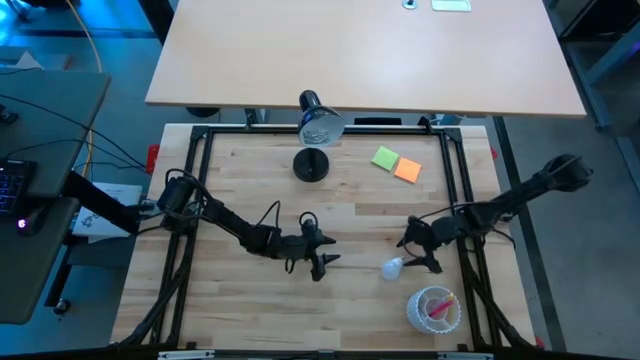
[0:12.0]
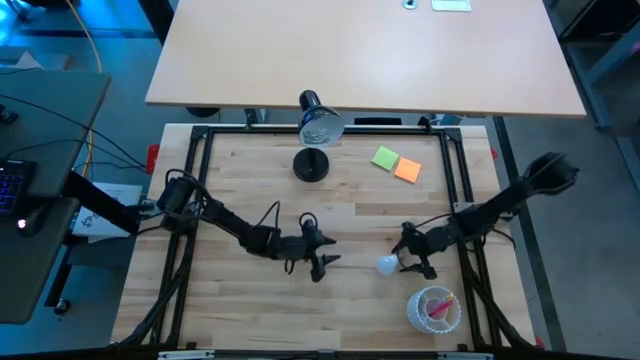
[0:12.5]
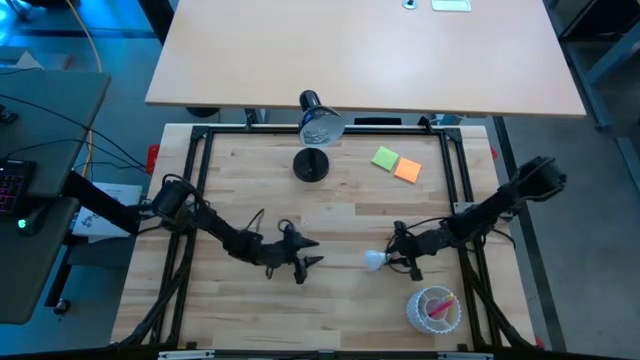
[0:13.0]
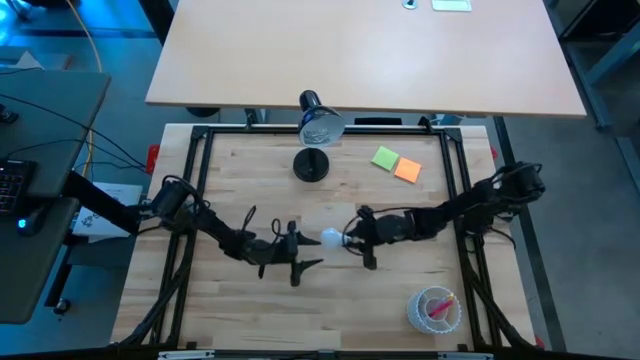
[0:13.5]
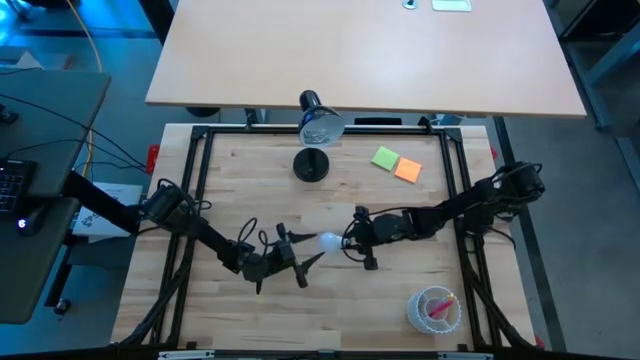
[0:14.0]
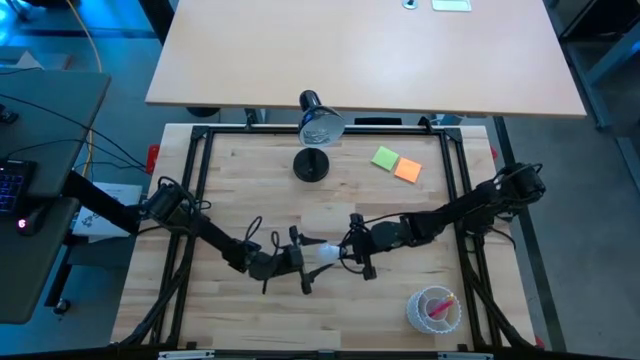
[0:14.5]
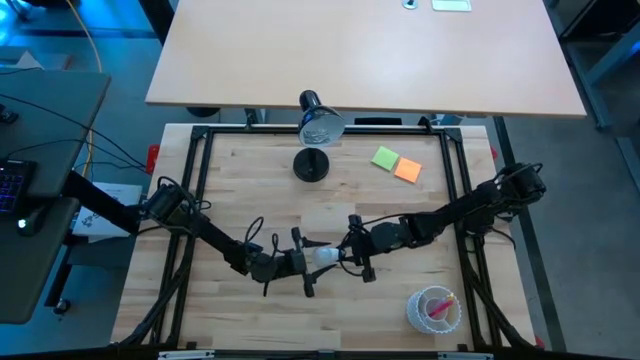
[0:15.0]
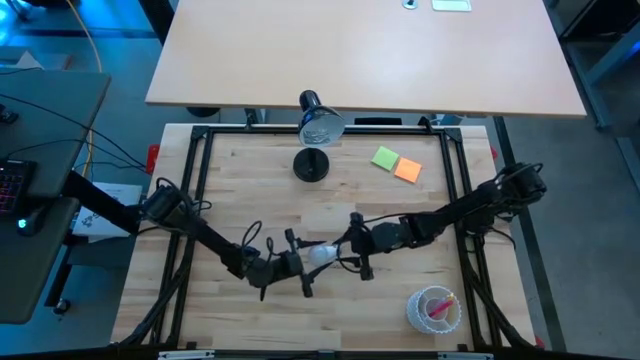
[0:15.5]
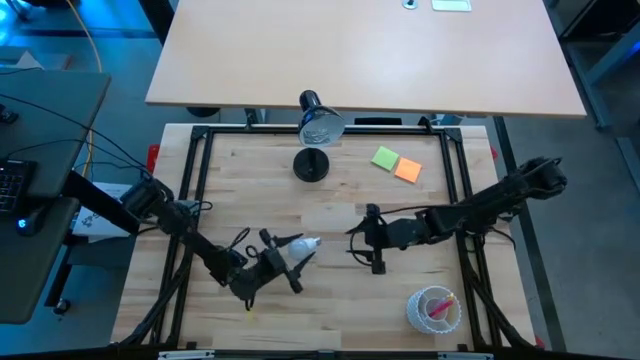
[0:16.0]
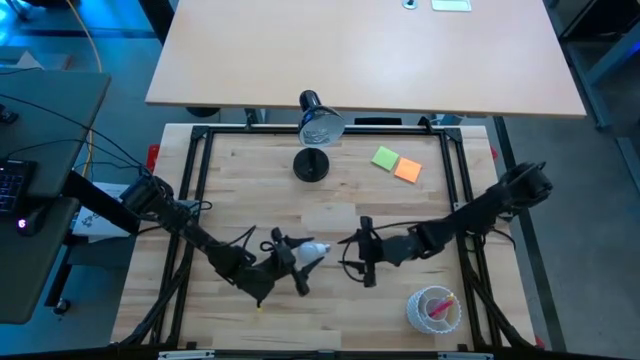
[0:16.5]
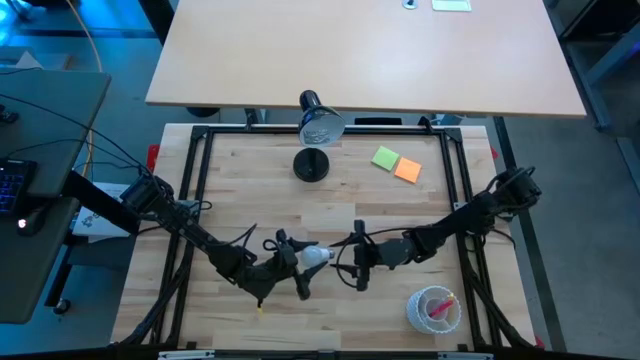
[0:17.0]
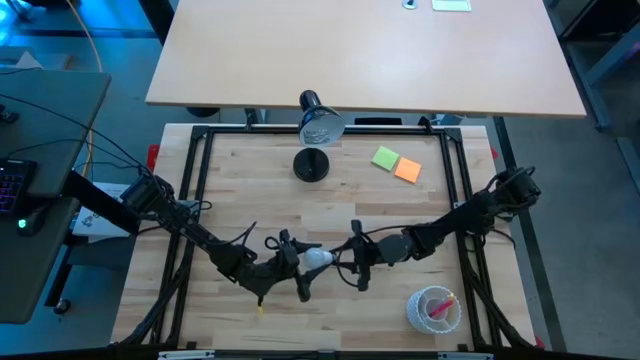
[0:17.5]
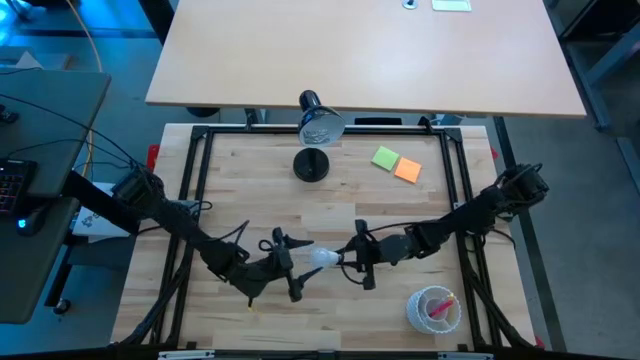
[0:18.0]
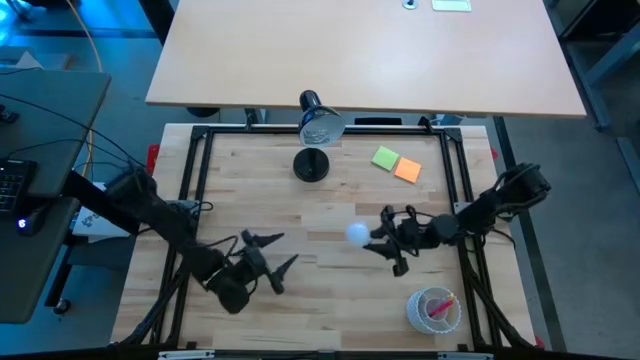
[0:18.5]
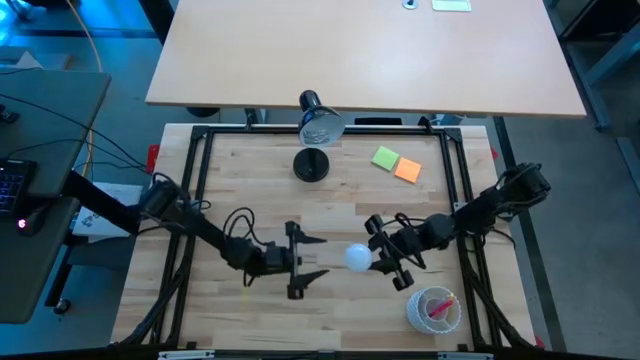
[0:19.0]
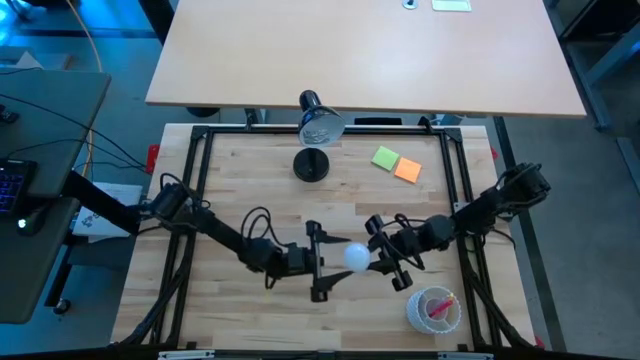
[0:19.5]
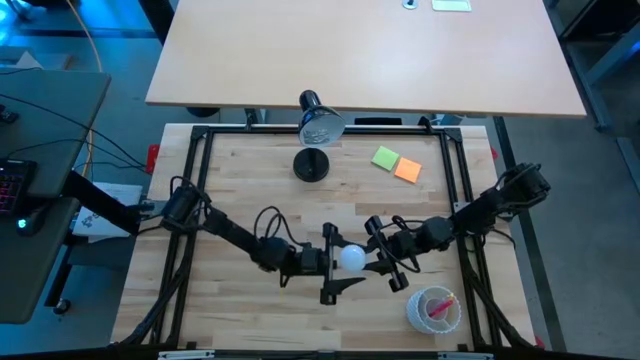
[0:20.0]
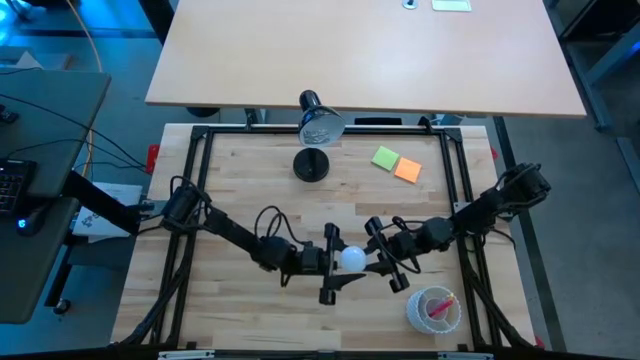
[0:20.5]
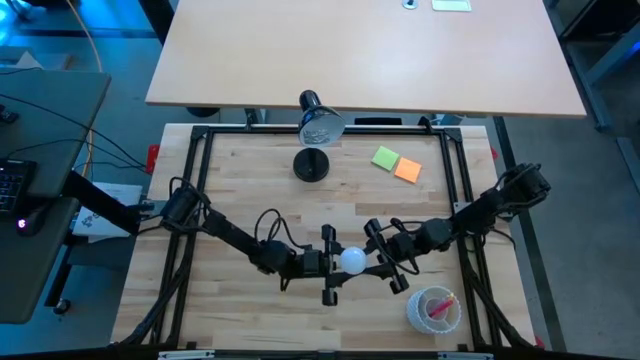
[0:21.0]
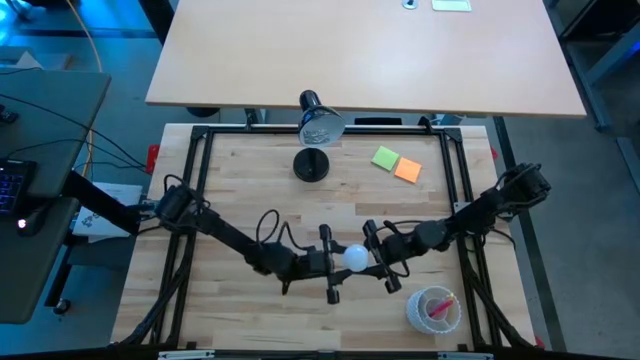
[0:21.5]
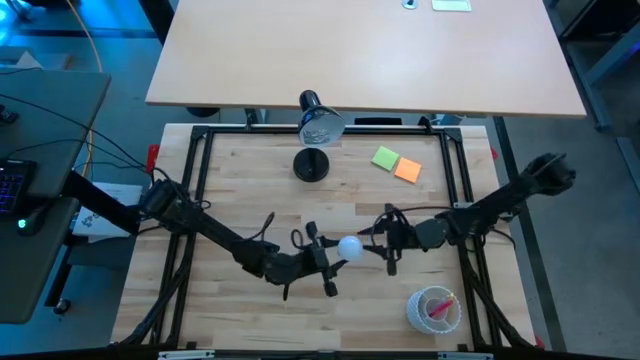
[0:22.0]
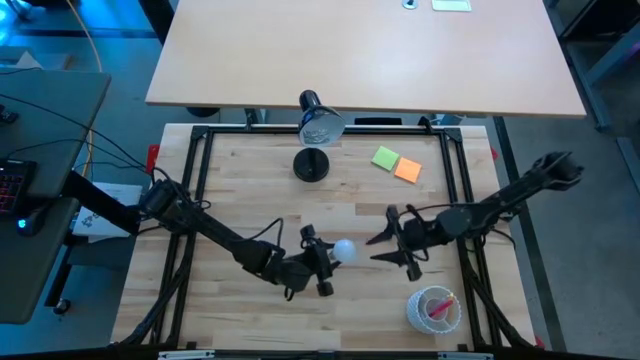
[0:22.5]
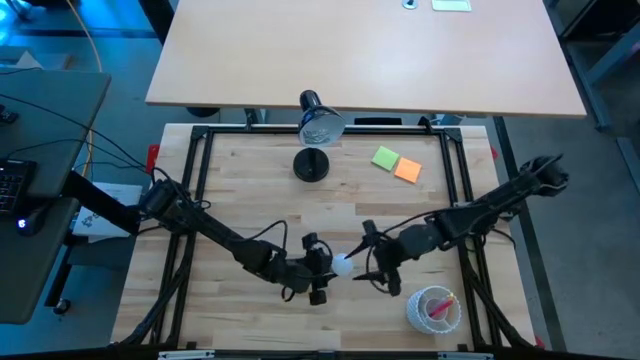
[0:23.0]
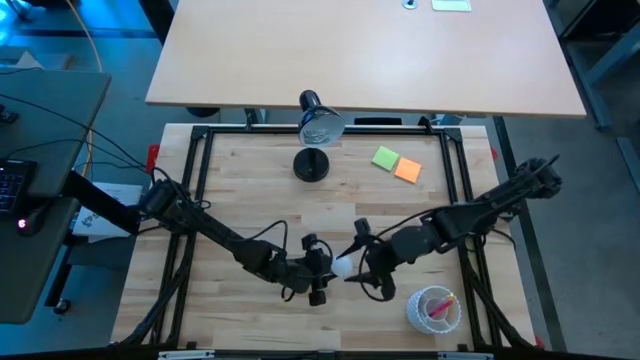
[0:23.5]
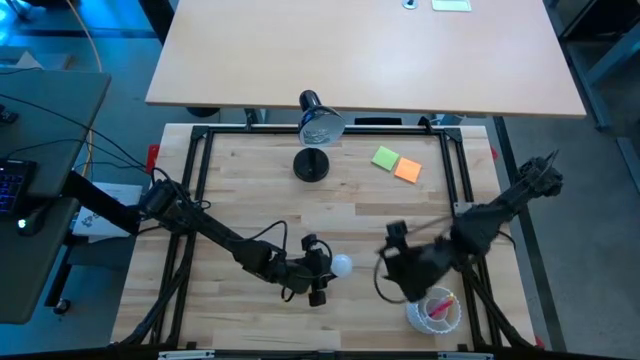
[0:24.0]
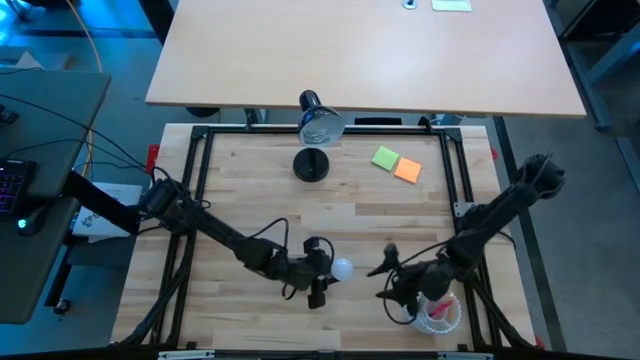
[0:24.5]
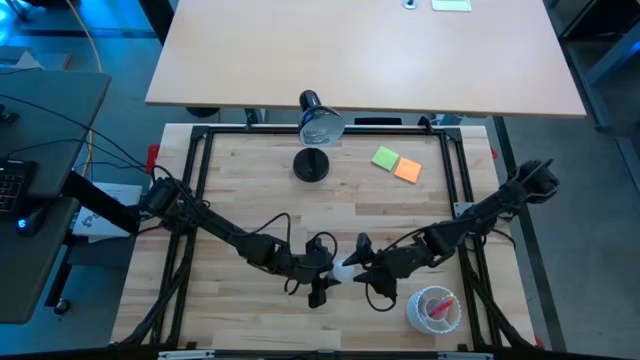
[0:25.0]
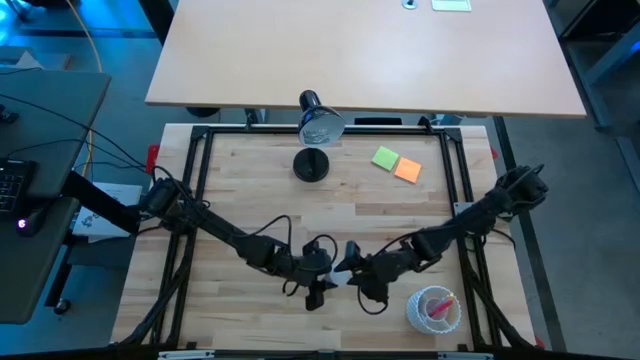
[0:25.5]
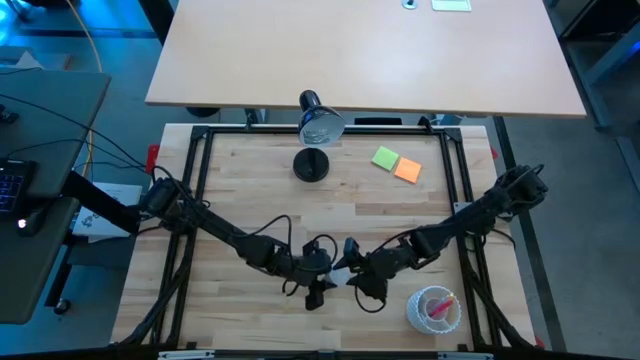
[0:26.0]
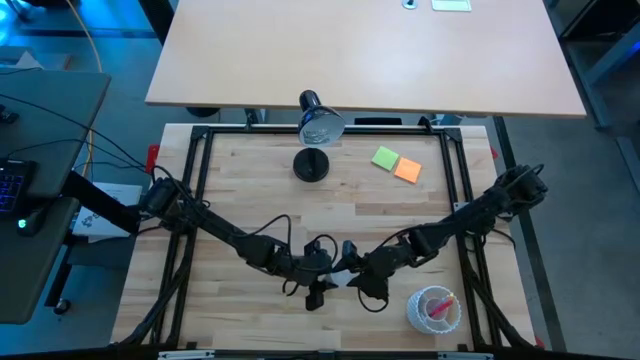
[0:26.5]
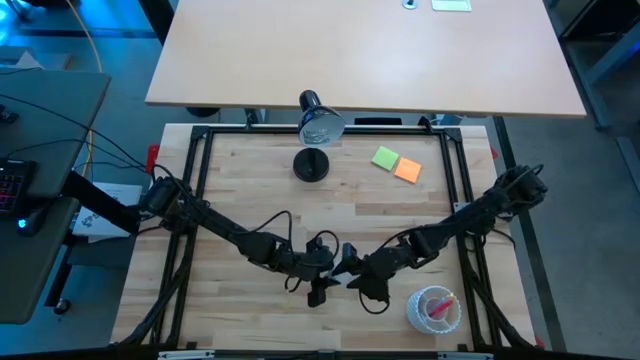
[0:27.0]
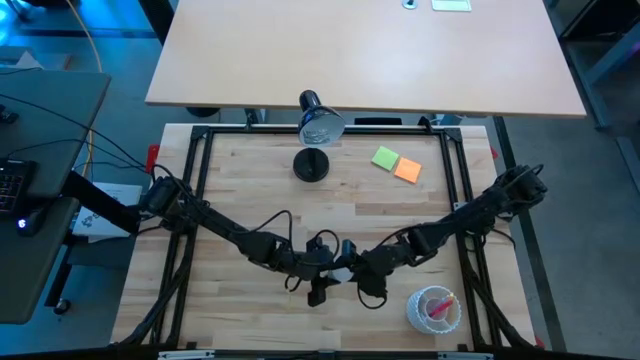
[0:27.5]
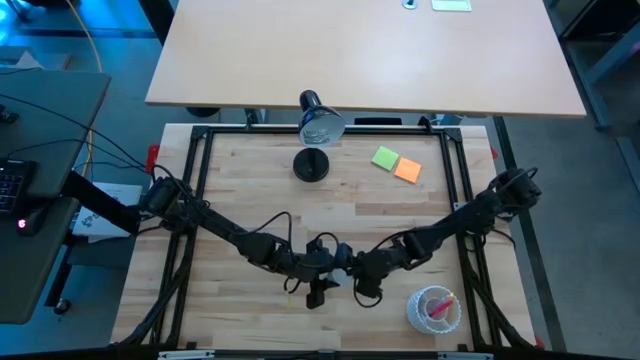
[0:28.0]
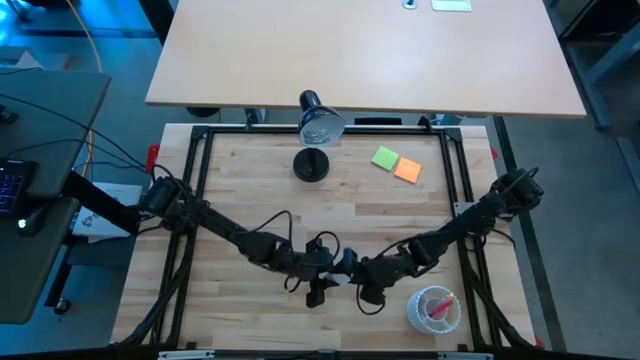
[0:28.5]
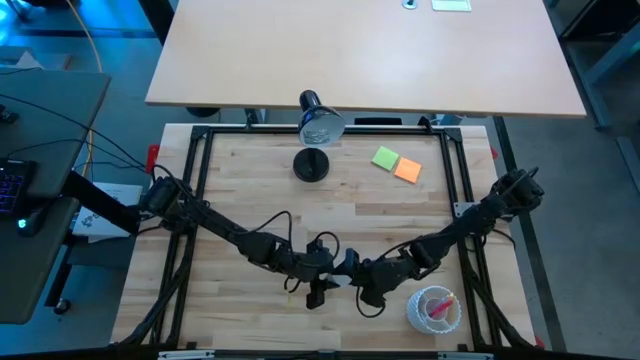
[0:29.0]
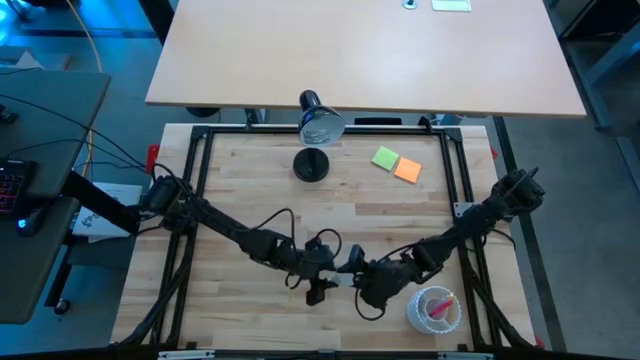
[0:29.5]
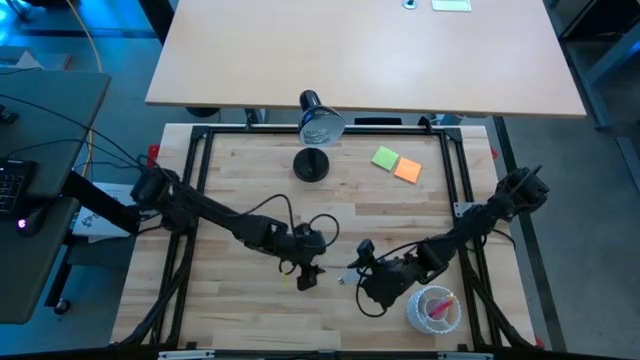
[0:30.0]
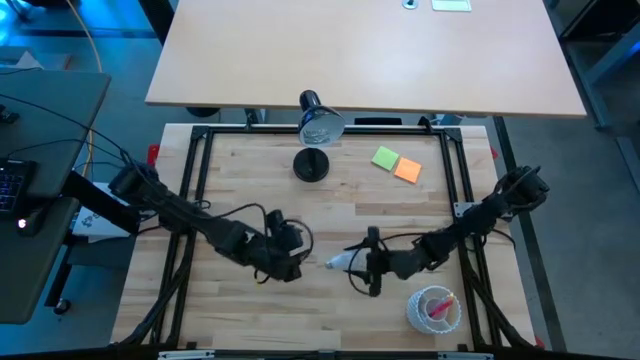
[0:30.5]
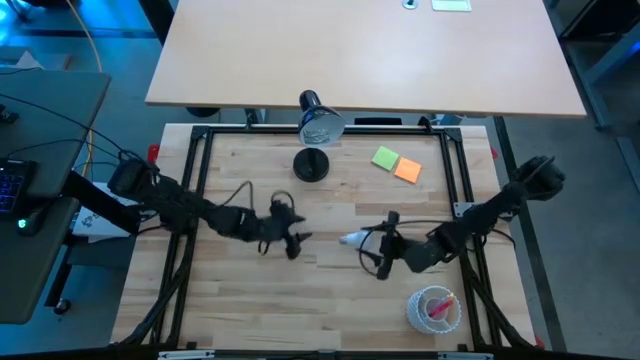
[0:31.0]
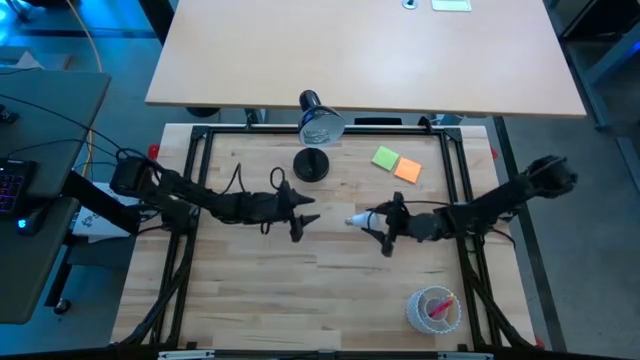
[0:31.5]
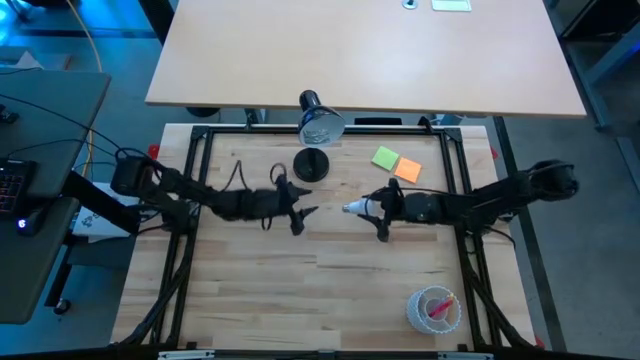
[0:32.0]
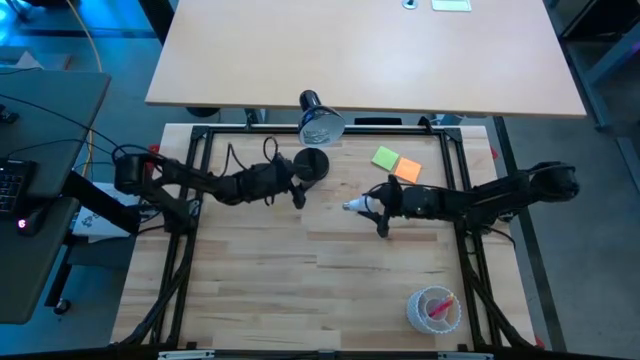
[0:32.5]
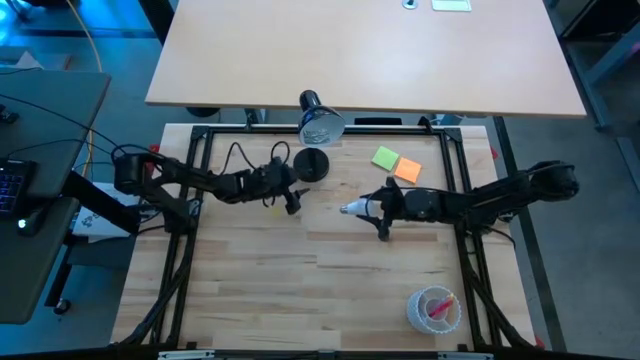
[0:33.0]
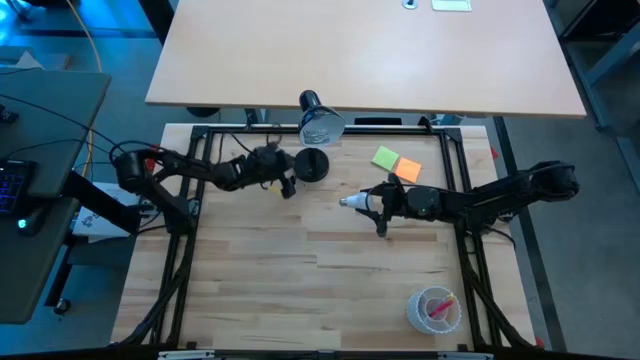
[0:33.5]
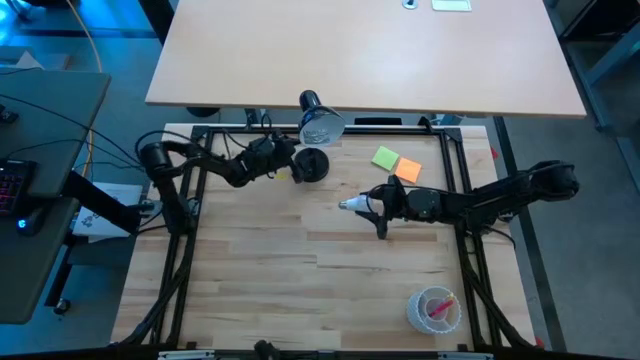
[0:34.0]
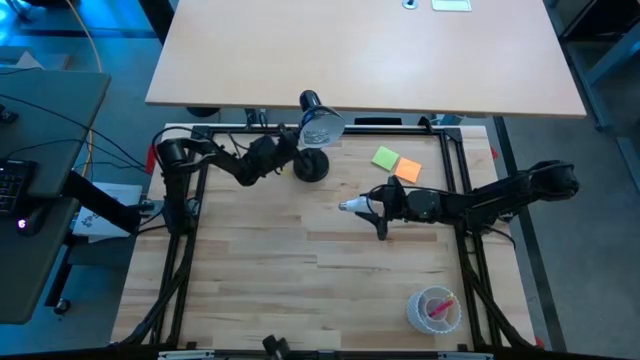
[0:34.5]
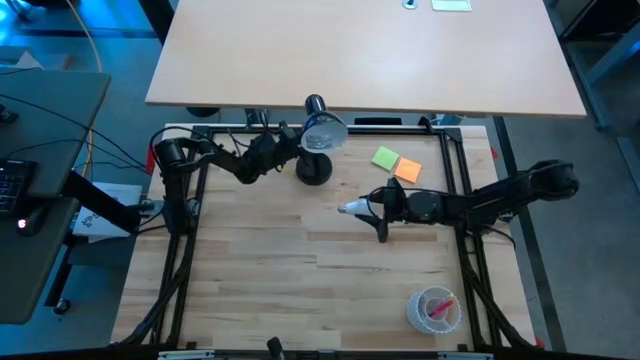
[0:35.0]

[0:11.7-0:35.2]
Task: Screw lightbulb
Insert the white lightbulb into the black lamp
